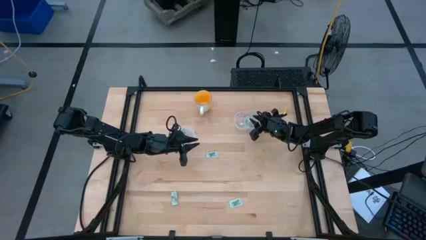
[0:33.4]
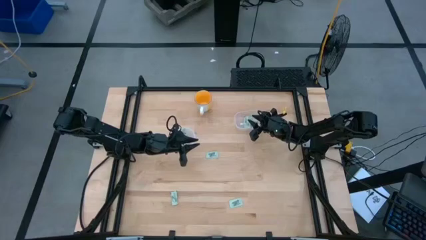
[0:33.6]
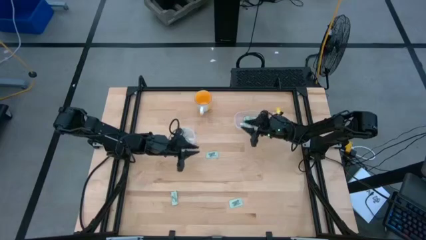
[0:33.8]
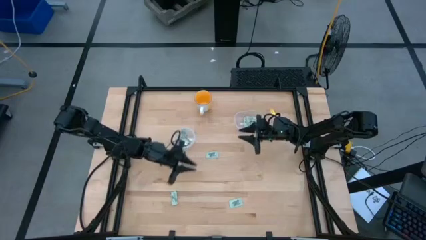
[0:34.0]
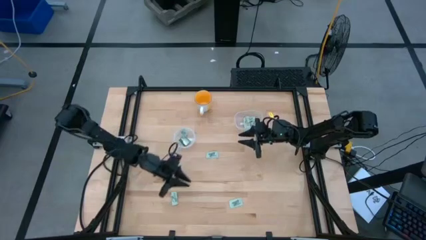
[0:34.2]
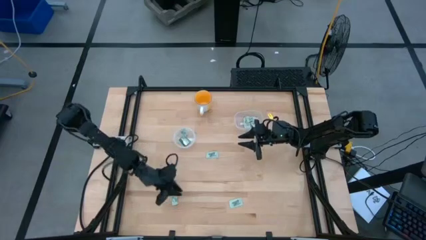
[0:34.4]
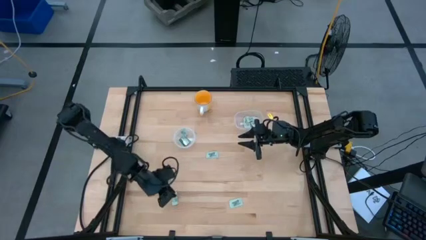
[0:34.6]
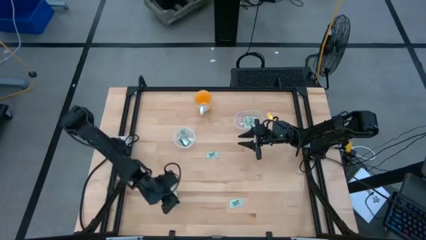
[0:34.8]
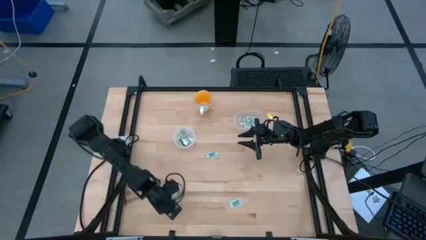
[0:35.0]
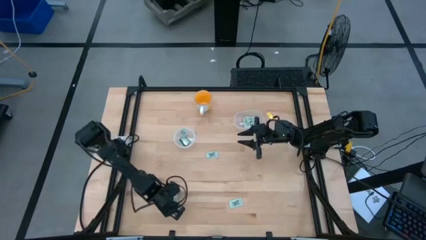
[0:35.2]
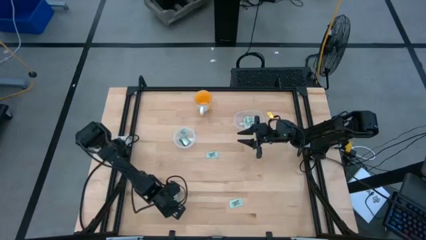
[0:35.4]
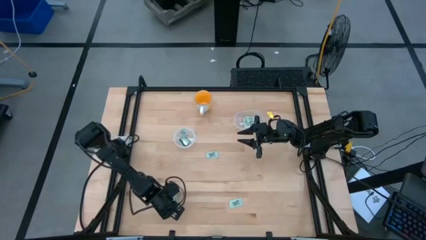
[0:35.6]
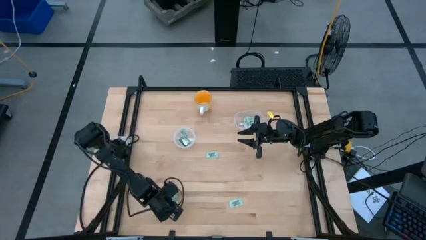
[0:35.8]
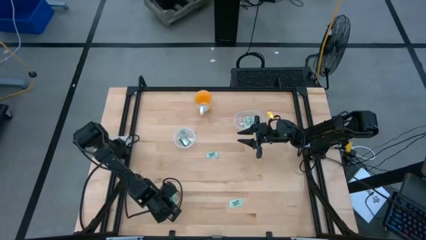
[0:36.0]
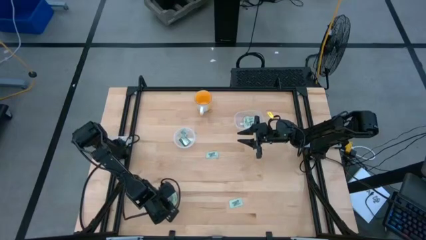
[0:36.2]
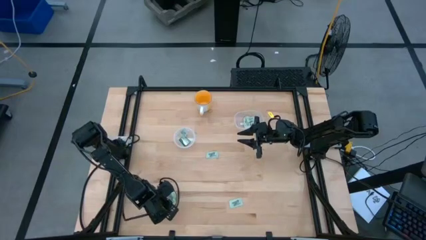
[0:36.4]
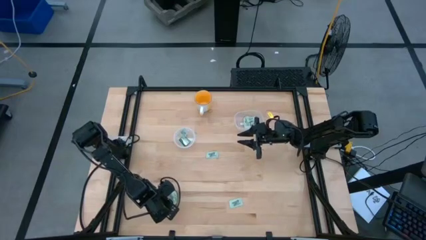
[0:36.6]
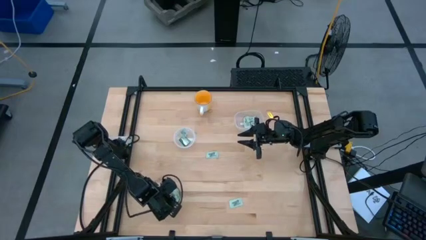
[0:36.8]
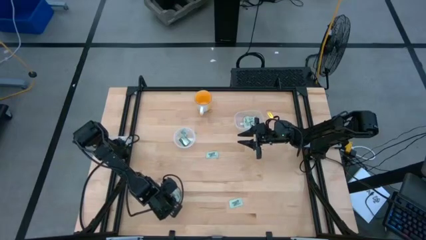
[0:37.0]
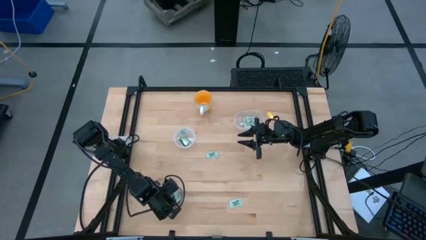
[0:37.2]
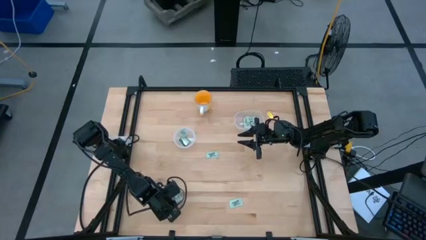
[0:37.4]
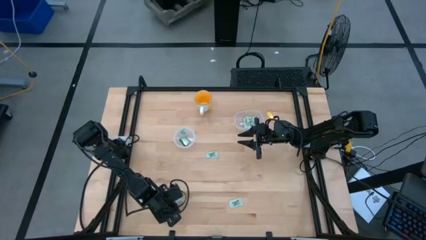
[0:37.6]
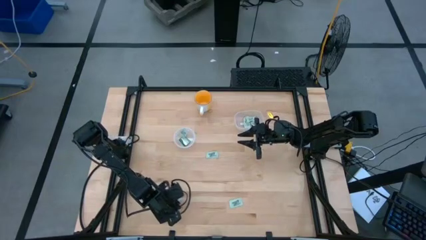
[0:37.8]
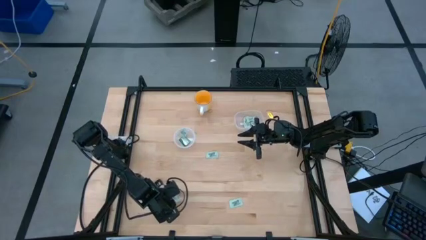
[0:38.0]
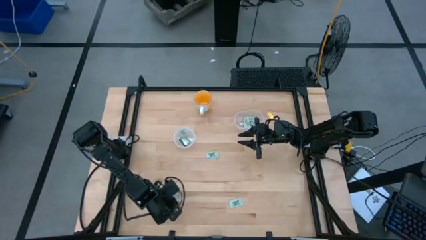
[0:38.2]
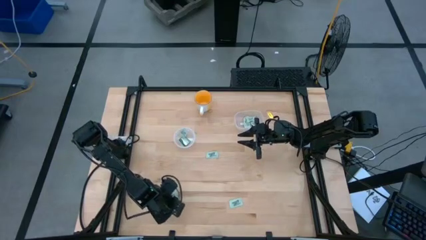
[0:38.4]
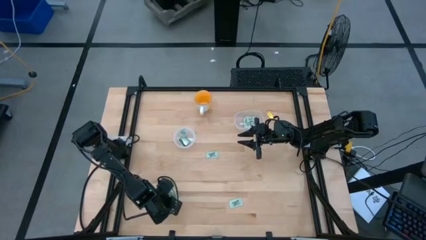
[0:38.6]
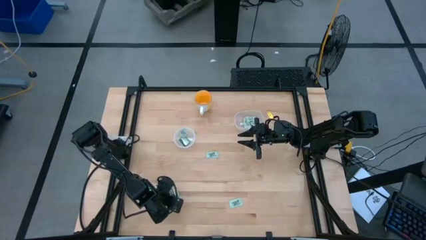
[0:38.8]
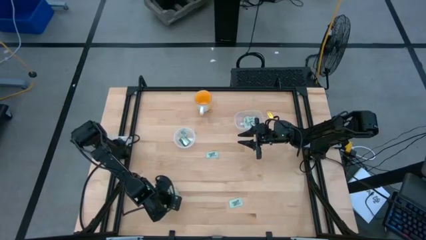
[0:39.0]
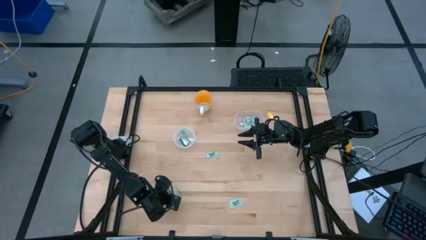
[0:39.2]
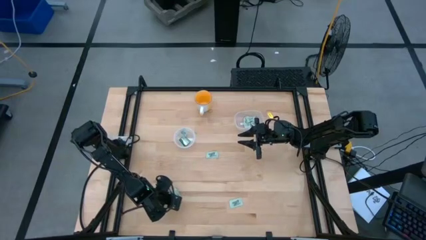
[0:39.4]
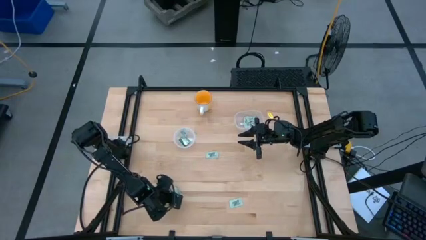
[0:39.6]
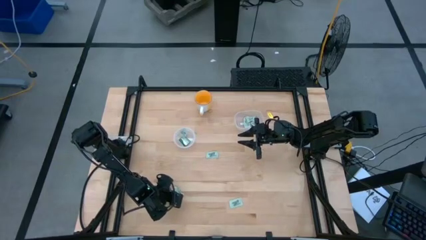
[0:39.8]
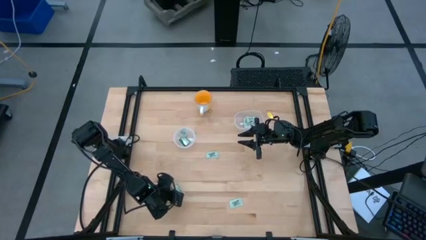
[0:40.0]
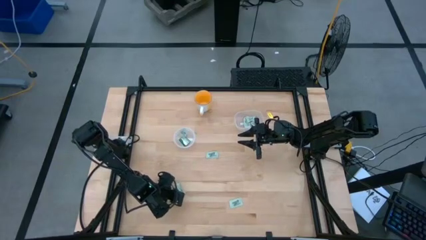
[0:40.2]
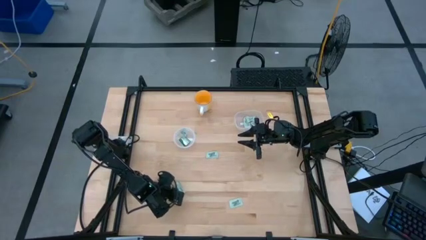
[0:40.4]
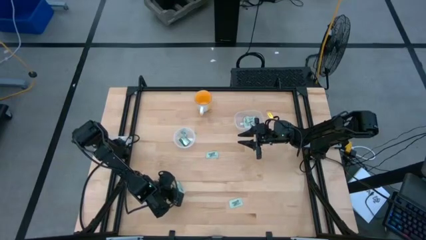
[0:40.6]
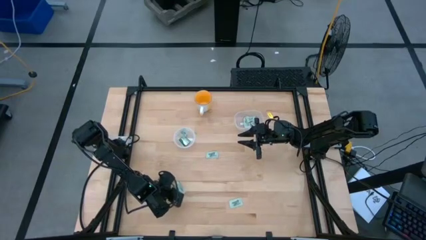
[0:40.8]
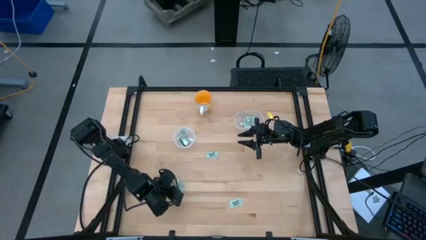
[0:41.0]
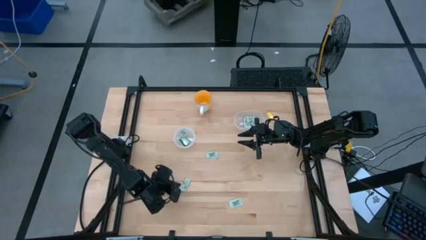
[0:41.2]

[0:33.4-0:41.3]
Task: Pick and place Stevia / Truvia into bins
Put the white stevia packet into the left transparent container

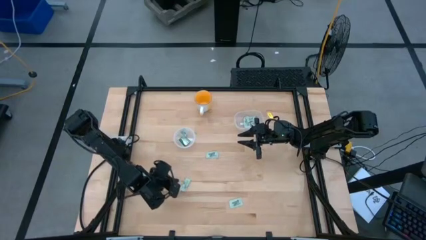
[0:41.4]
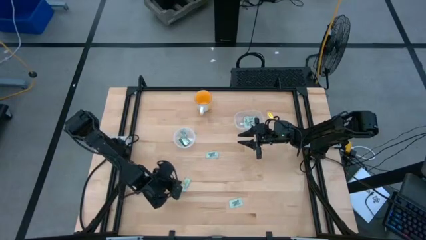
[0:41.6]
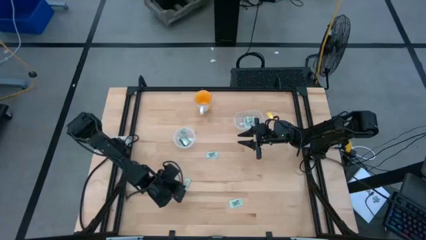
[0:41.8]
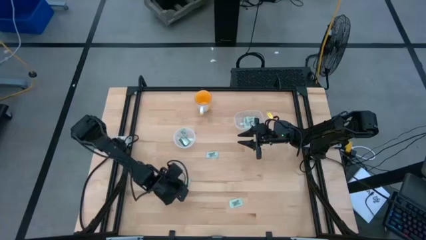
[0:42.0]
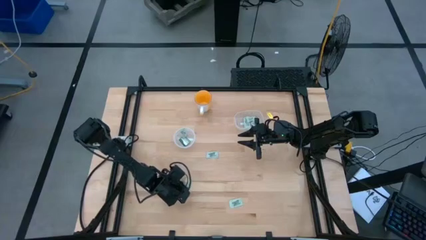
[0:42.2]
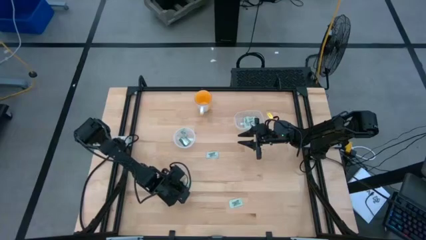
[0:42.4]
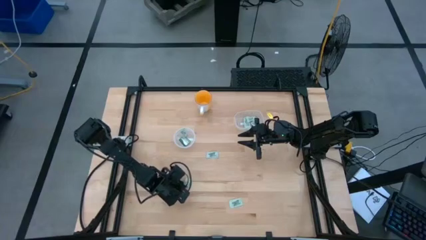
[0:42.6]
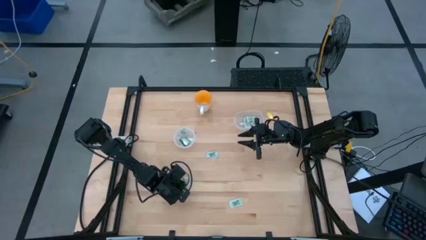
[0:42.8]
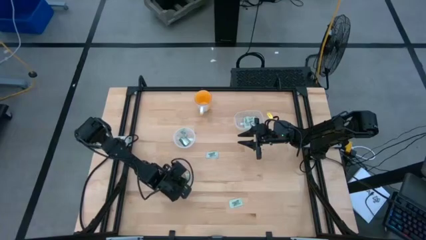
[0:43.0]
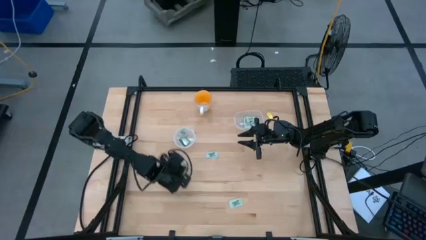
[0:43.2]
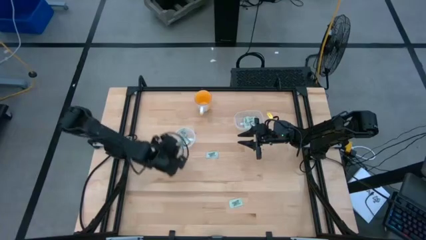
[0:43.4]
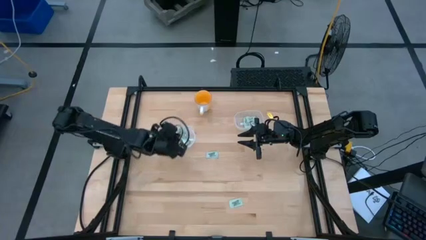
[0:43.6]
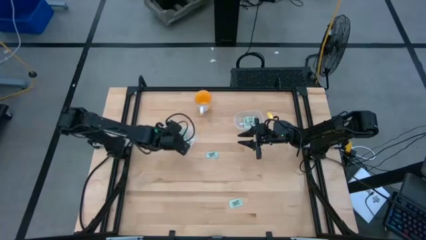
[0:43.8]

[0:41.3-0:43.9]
Put the white stevia packet into the left transparent container

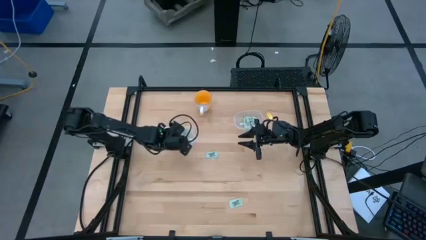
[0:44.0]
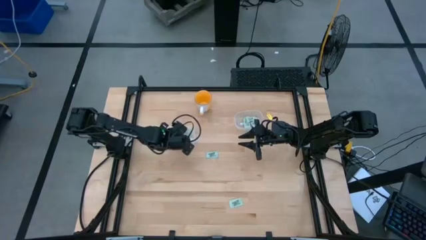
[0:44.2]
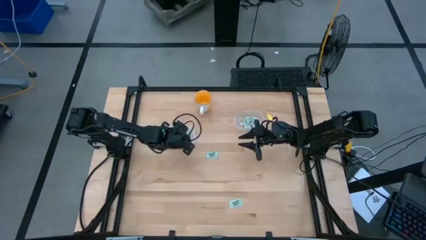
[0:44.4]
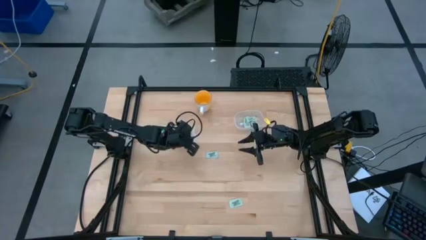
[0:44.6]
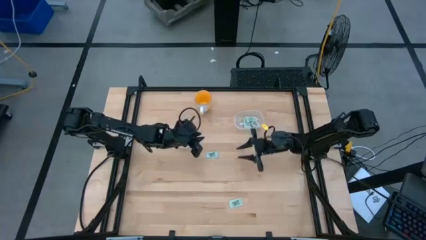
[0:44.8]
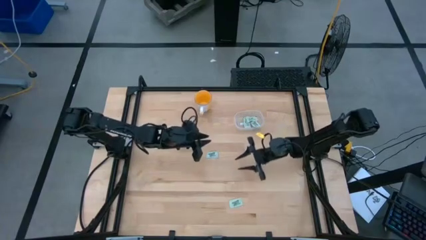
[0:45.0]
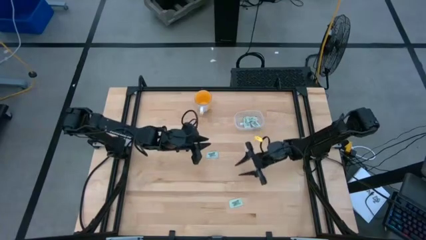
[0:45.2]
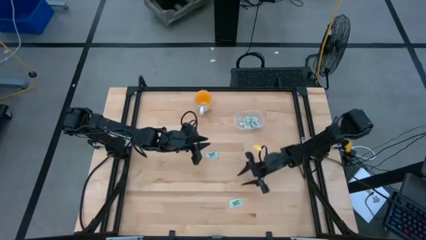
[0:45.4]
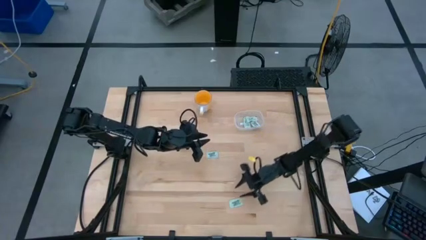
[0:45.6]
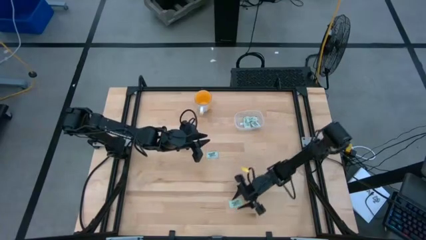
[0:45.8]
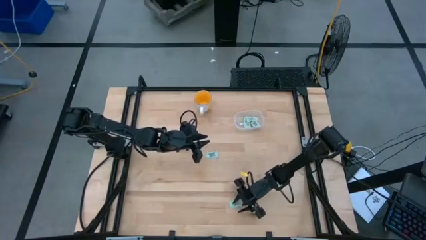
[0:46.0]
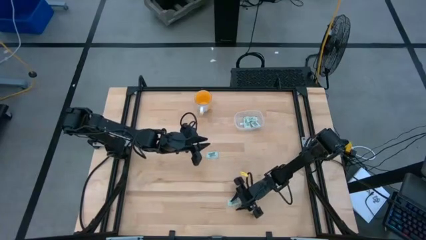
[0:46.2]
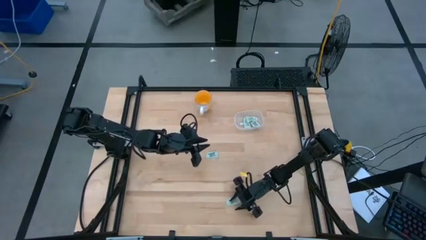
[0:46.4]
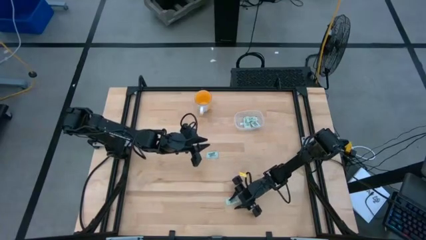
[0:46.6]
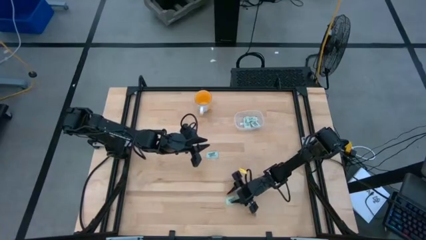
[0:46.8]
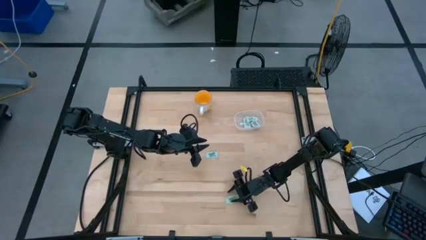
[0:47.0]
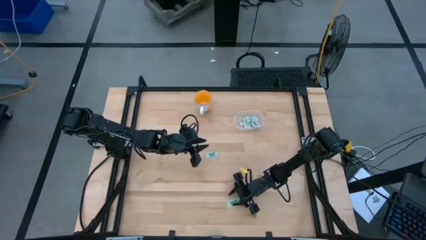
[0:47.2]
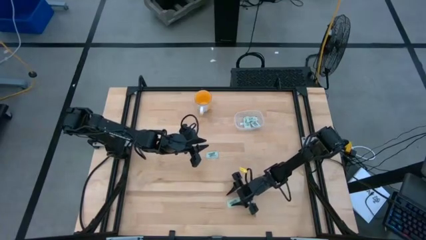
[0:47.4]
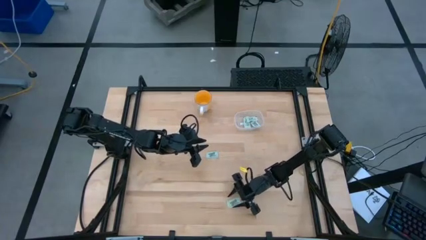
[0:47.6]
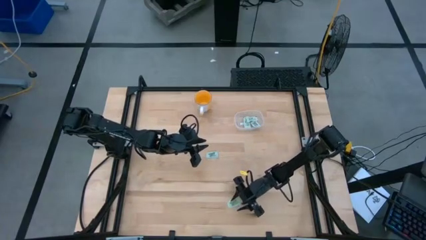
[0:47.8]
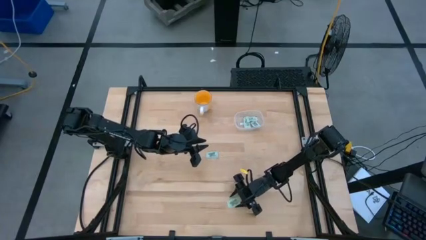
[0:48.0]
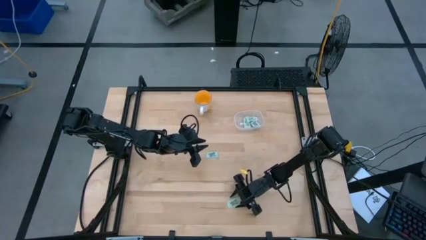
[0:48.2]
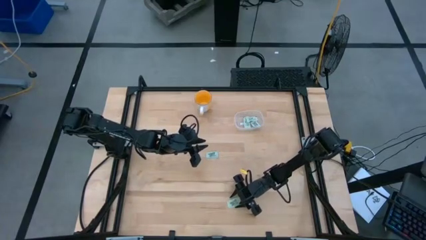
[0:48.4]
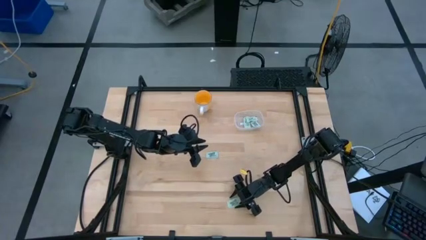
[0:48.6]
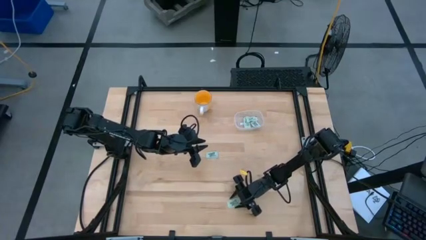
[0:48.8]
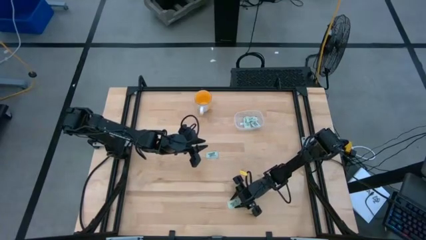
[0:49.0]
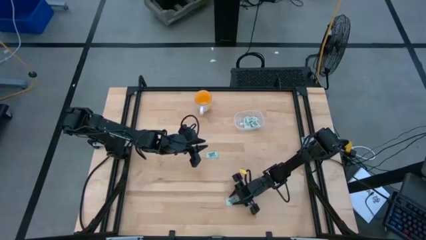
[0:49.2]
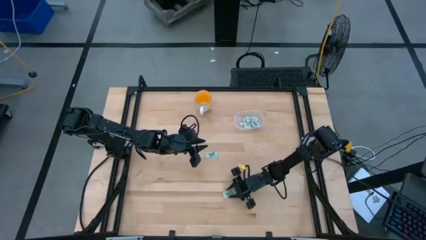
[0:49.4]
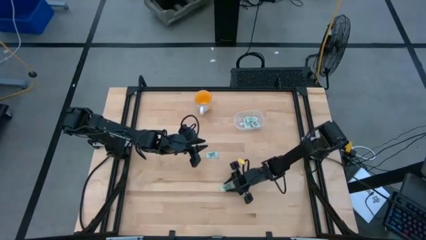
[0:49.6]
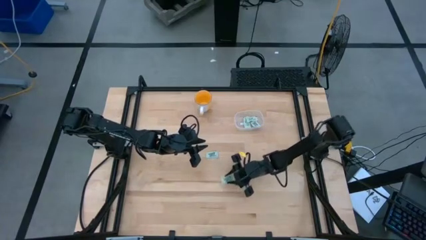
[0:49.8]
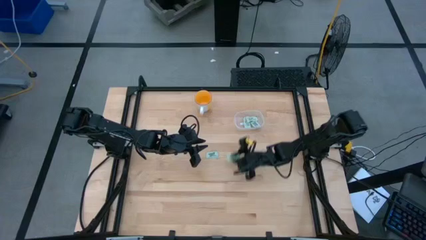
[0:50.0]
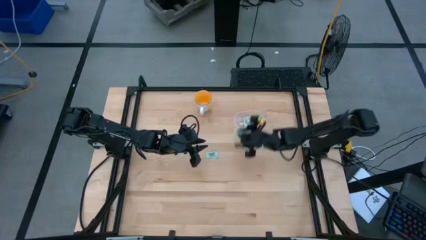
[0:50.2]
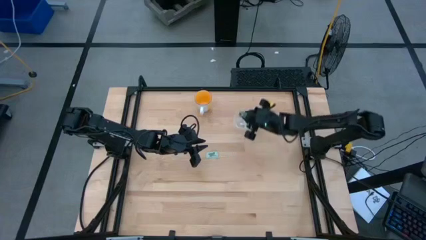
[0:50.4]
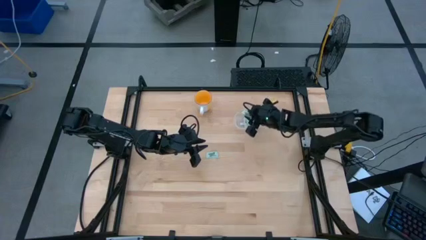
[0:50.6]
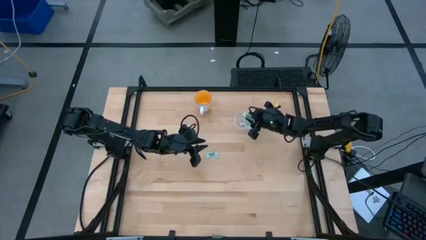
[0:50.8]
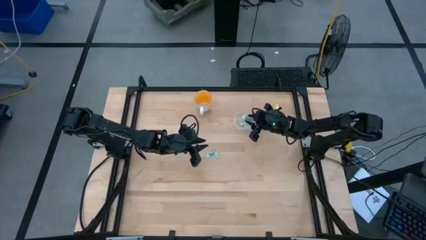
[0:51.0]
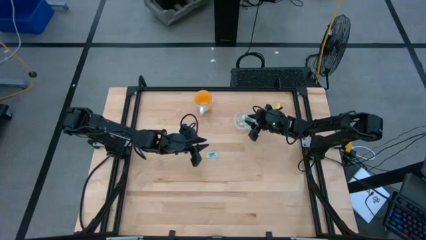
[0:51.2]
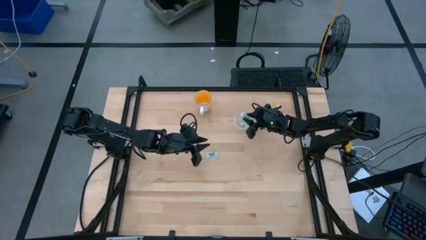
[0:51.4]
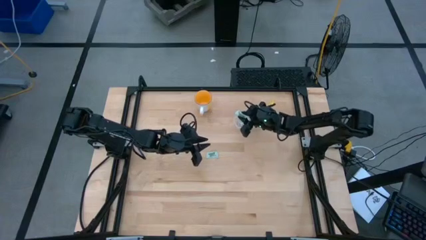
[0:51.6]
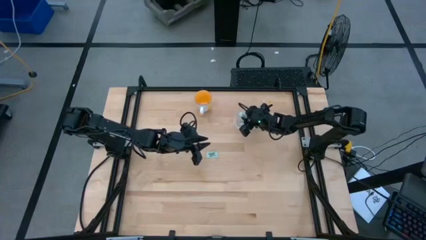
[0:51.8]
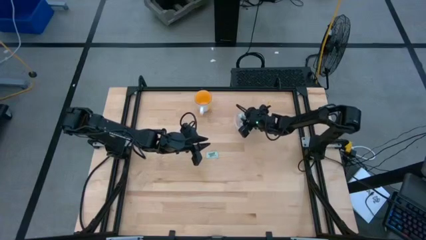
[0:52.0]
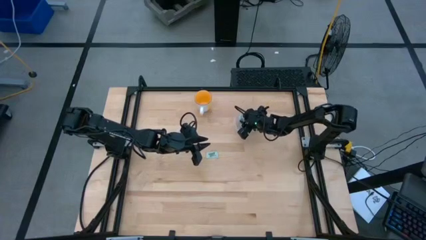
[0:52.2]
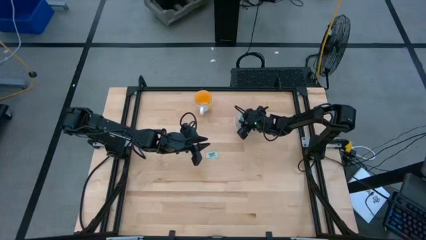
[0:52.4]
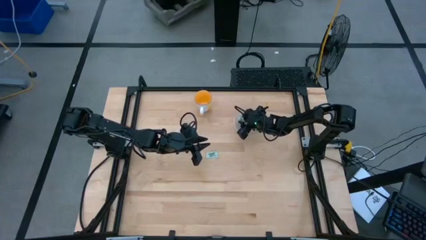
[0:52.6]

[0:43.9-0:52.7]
Put the white stevia packet into the right transparent container
